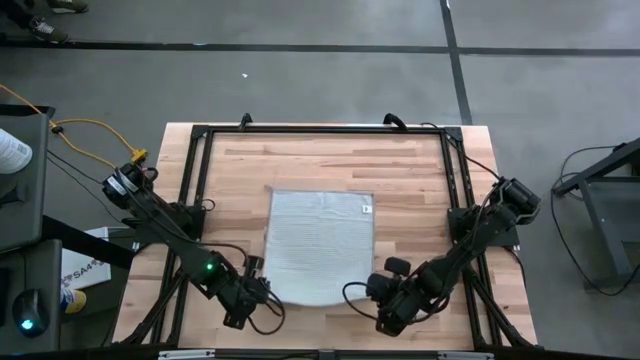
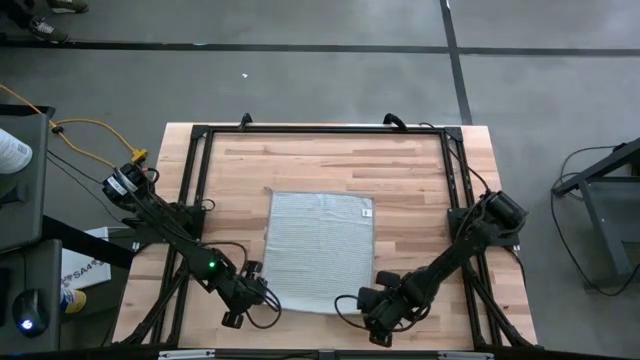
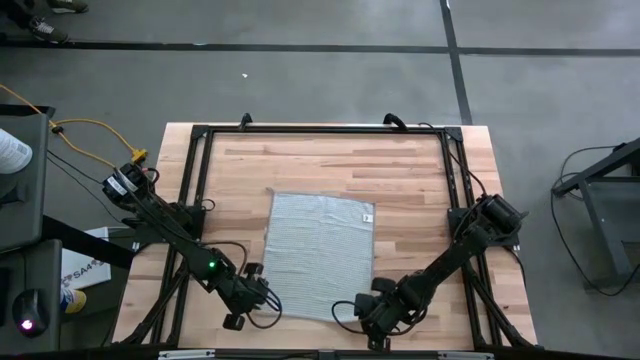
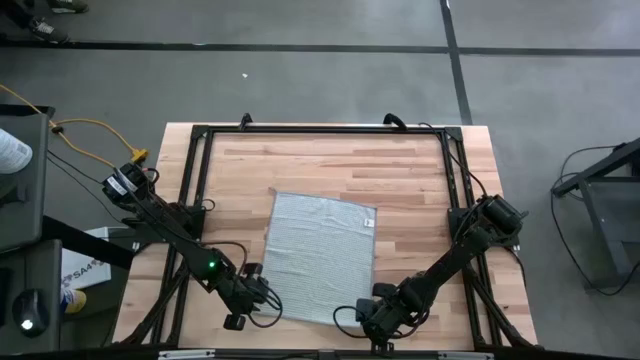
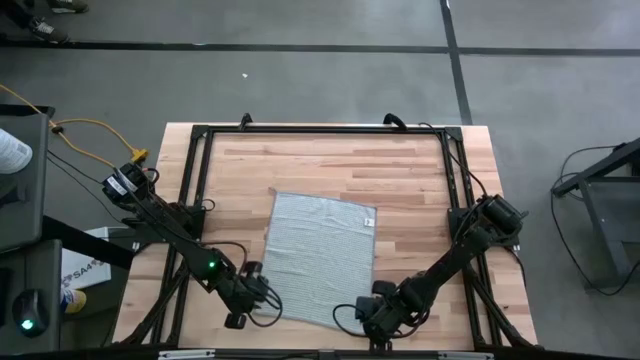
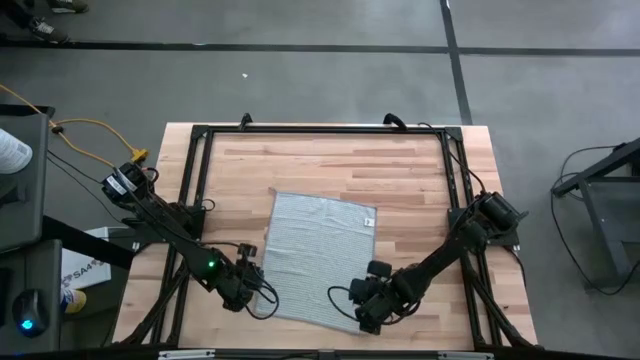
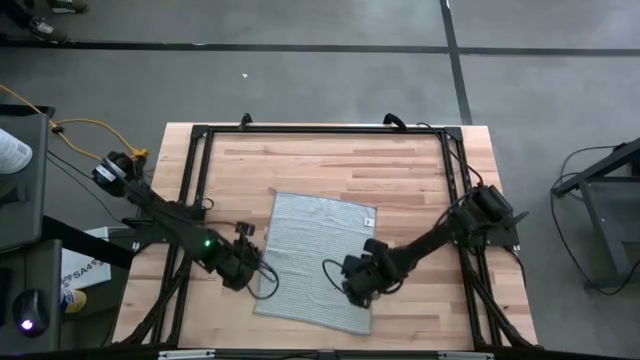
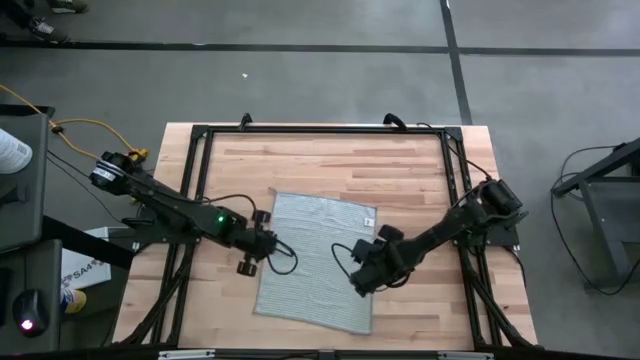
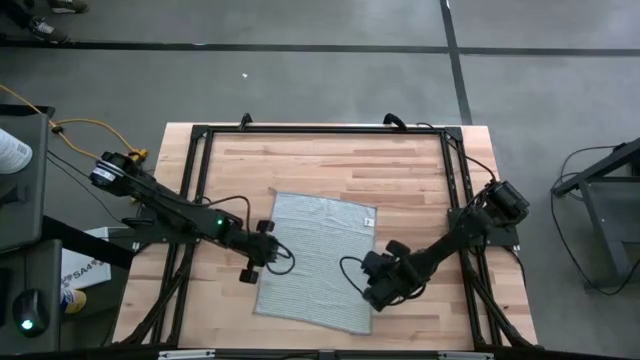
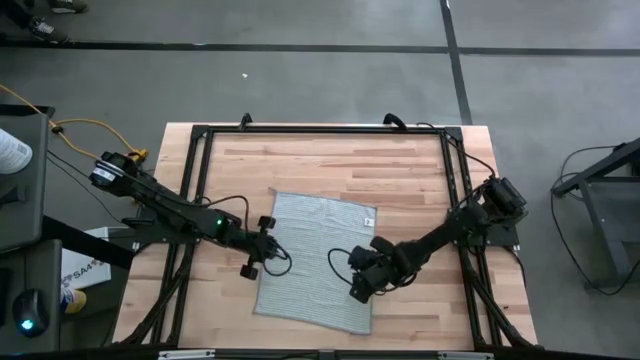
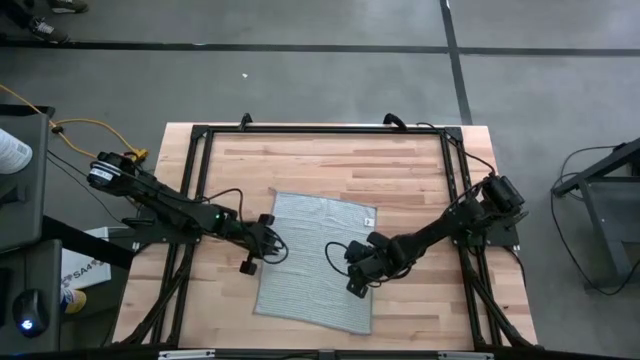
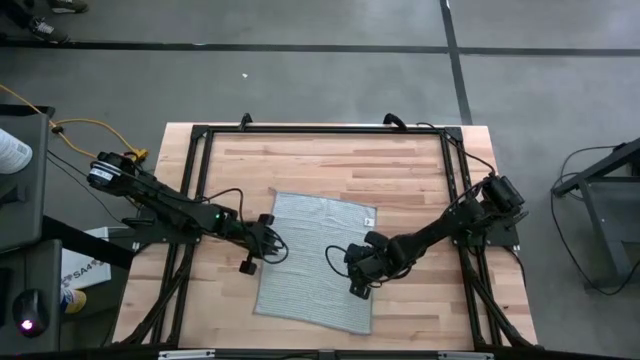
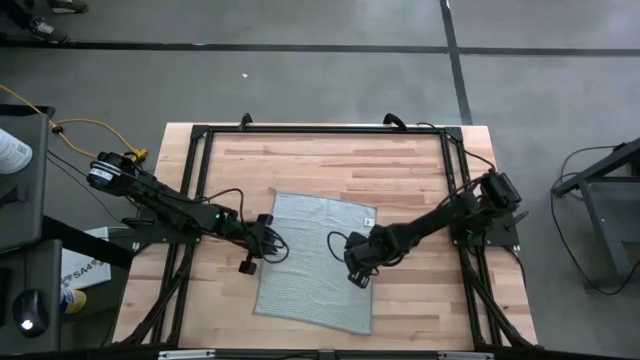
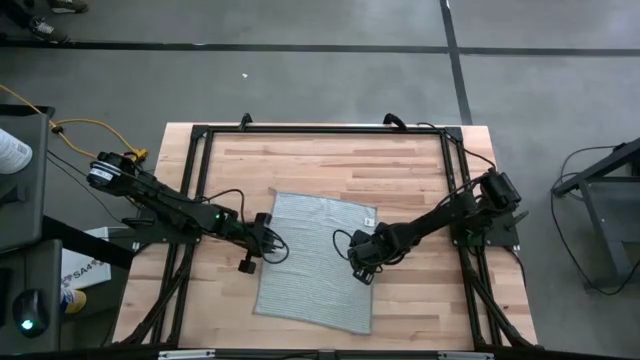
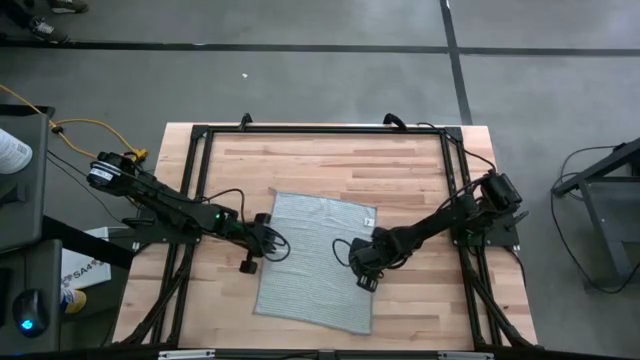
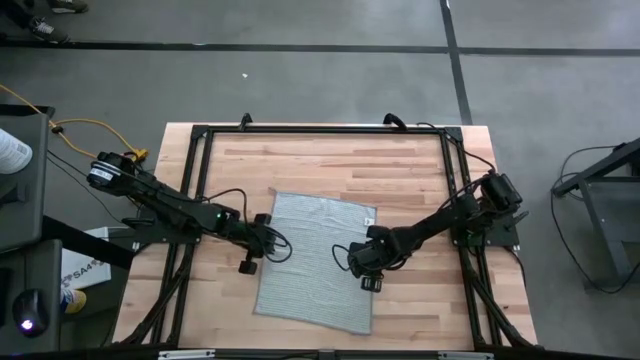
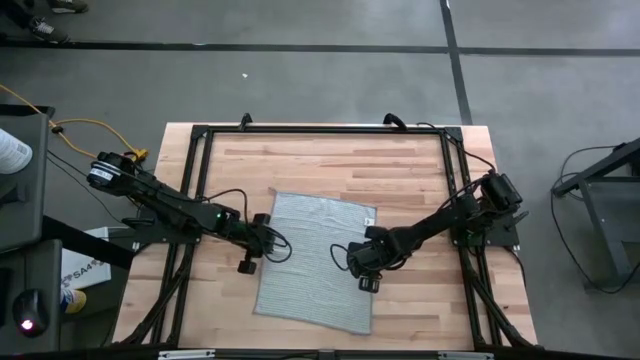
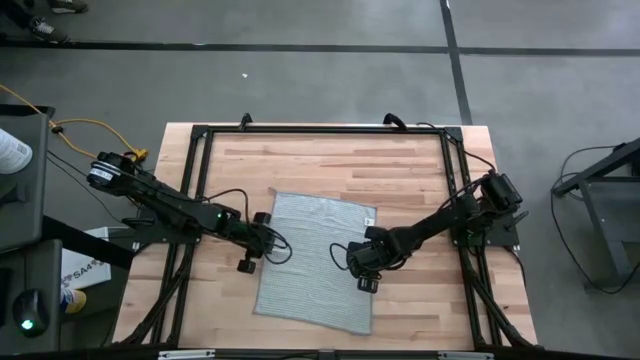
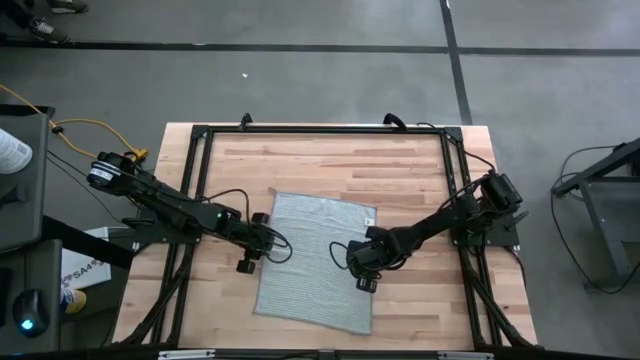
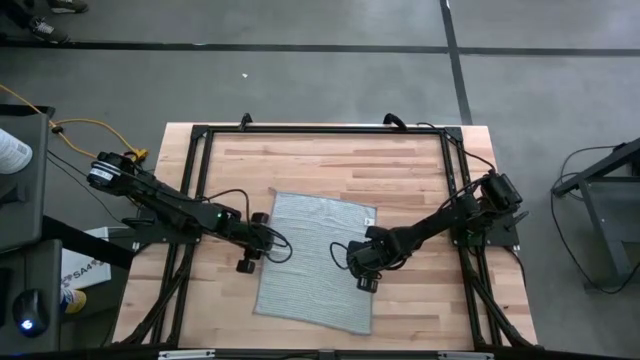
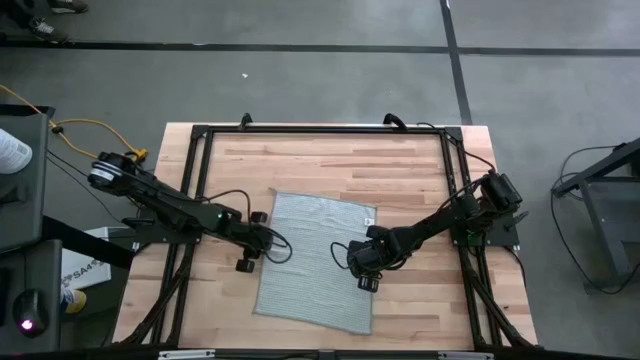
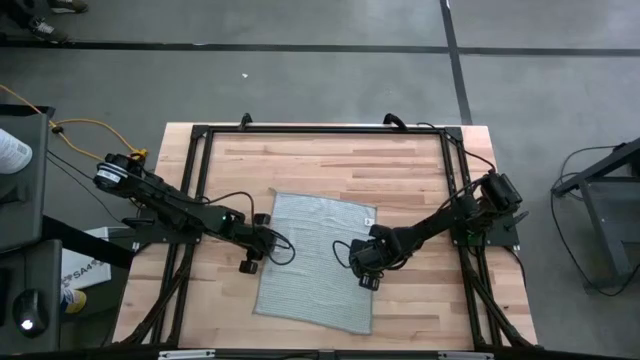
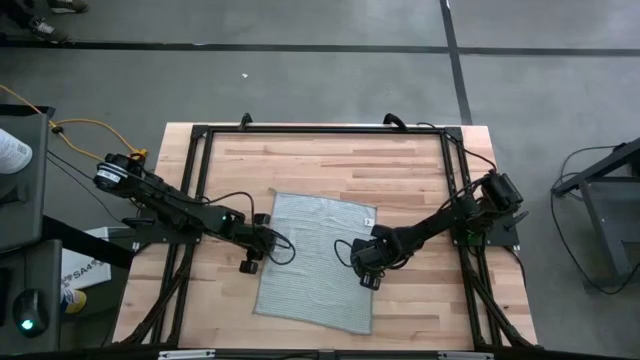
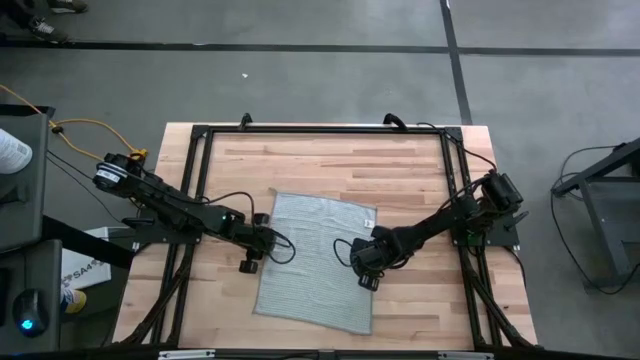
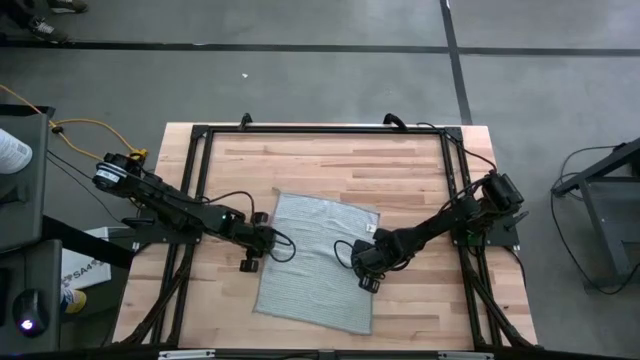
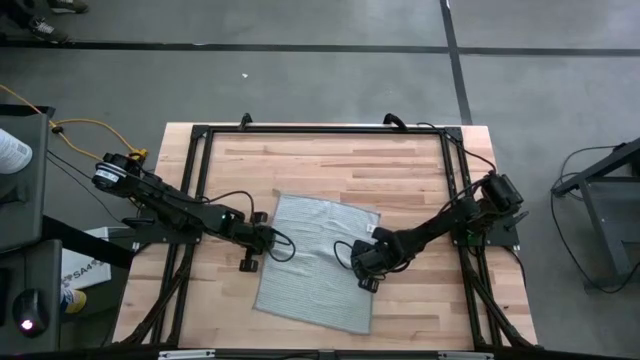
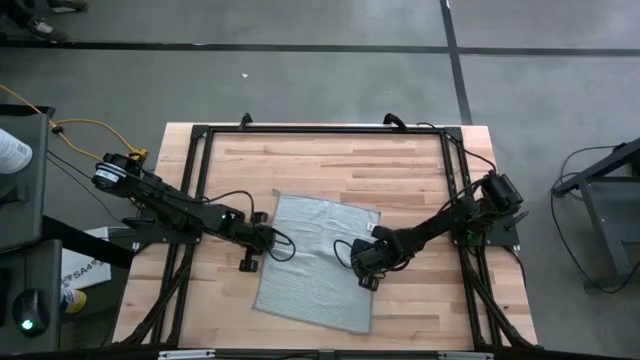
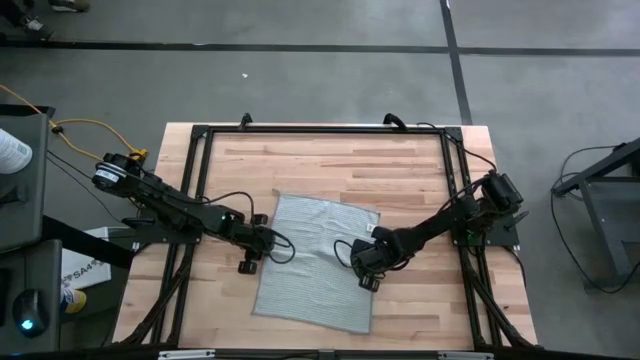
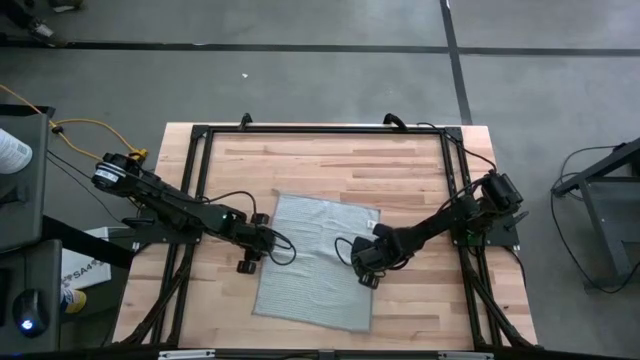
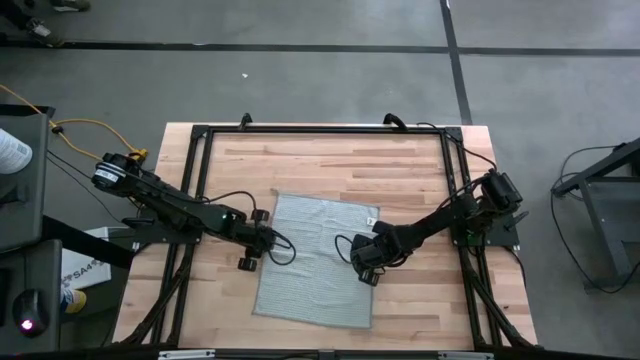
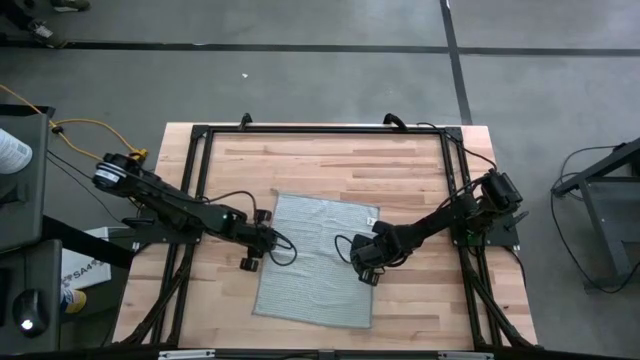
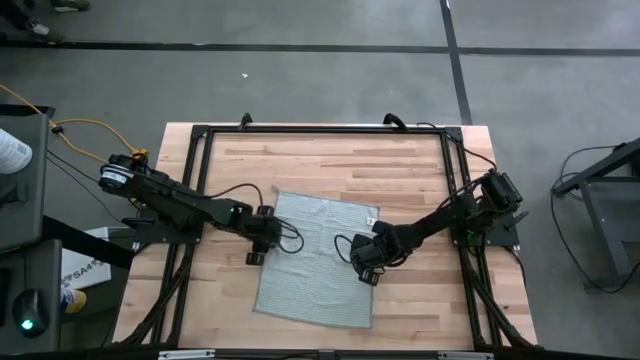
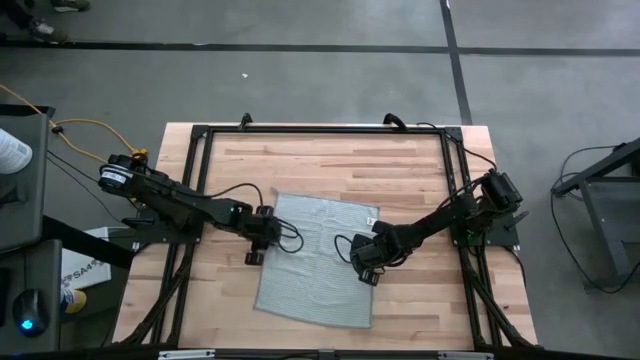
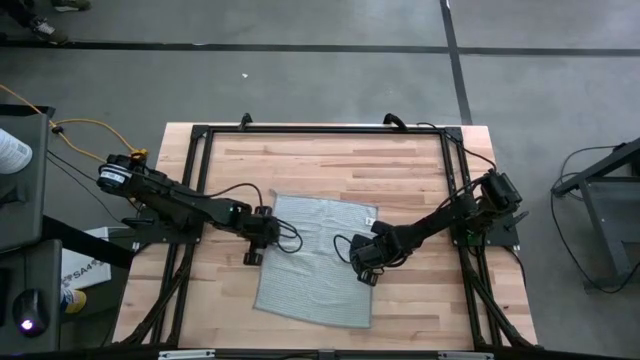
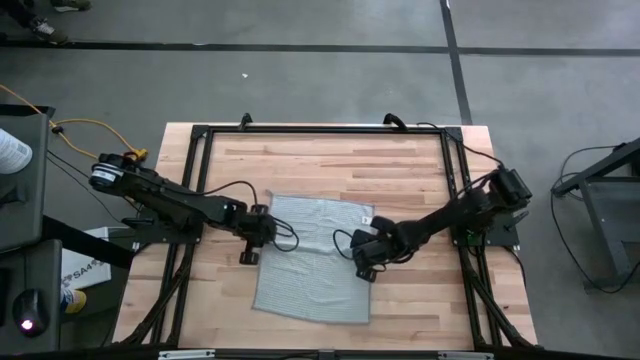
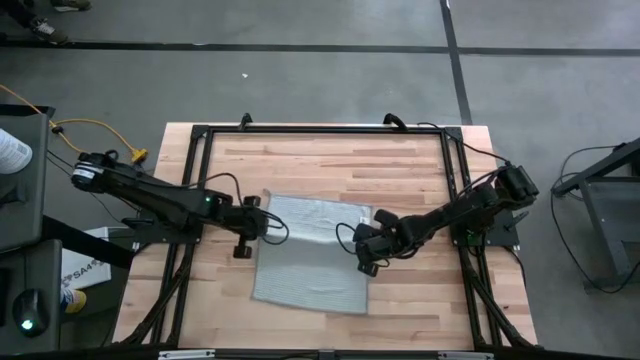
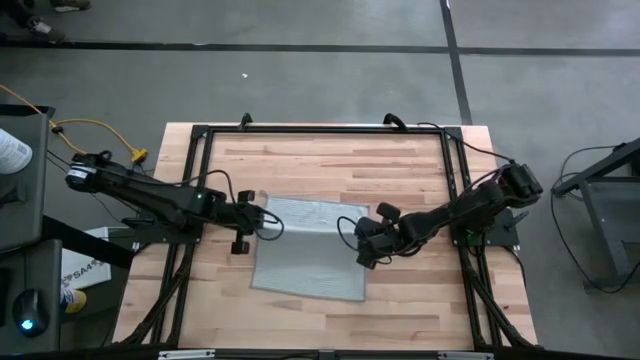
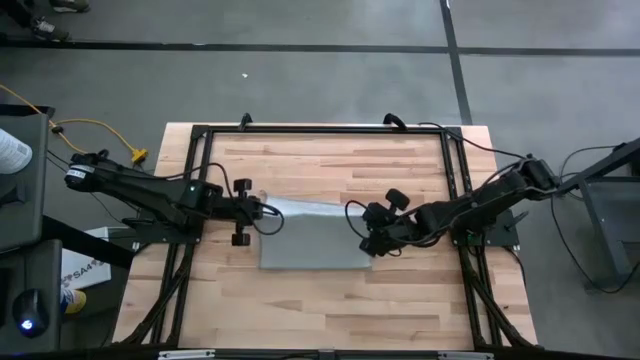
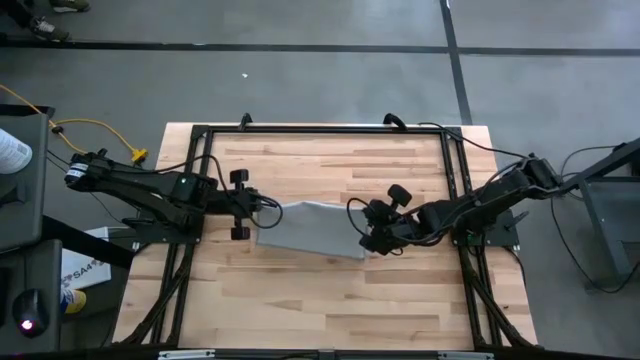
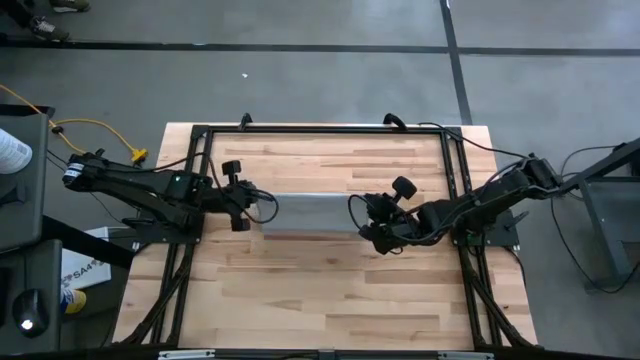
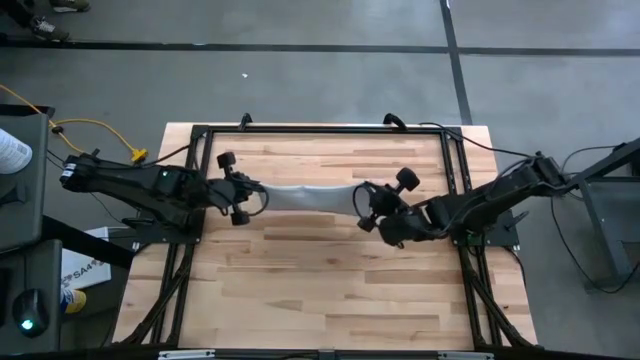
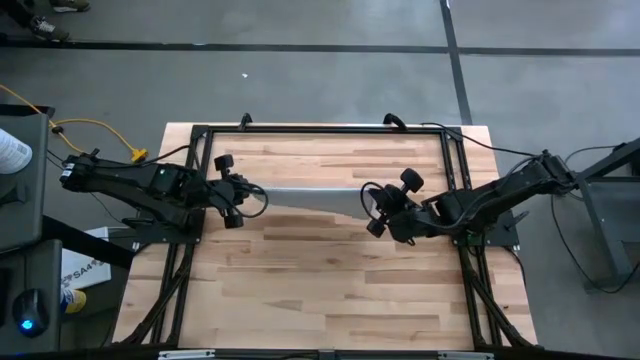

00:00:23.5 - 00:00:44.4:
Task: Fold microfiber towels
Fold the gray towel
